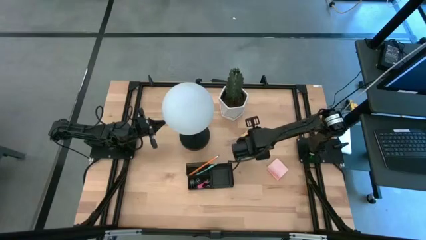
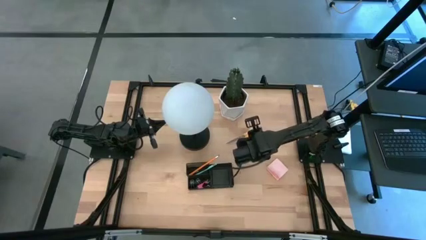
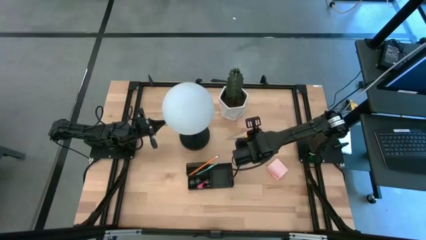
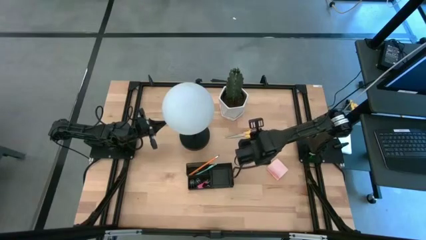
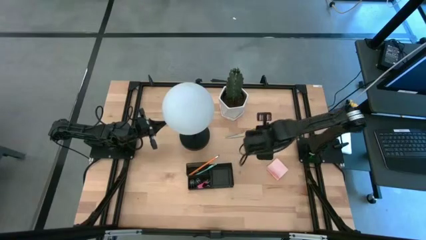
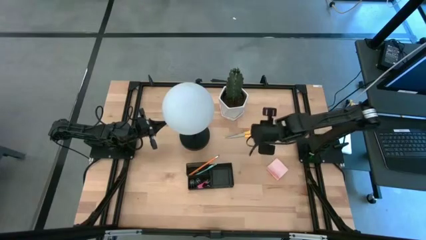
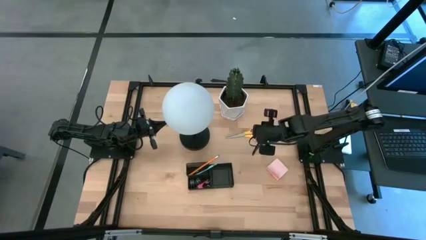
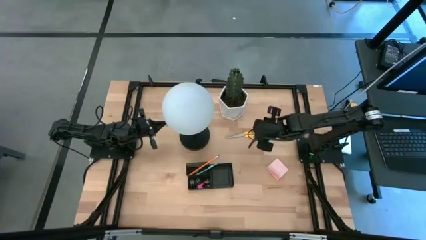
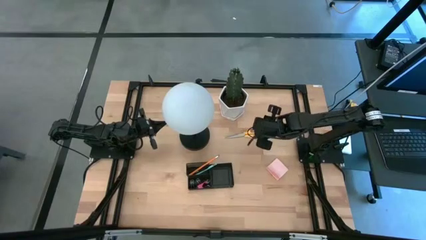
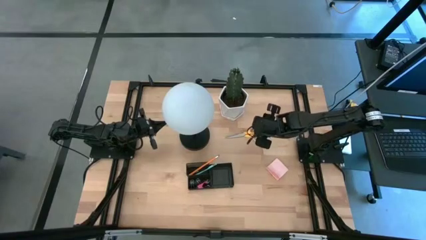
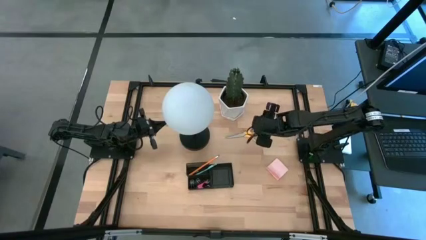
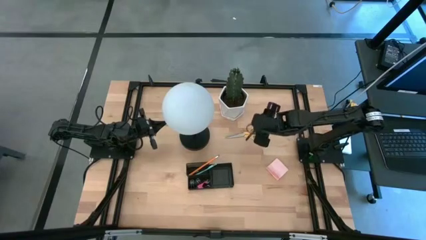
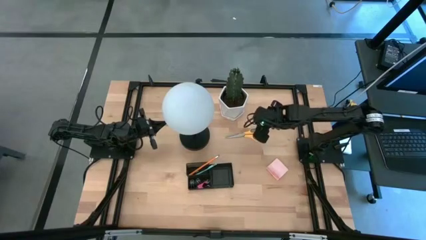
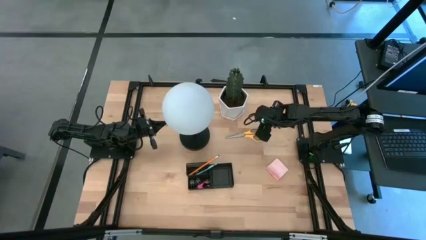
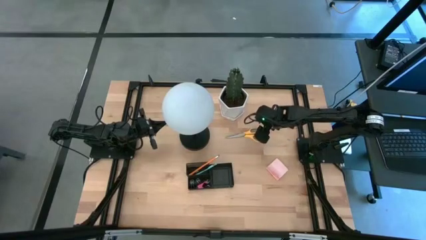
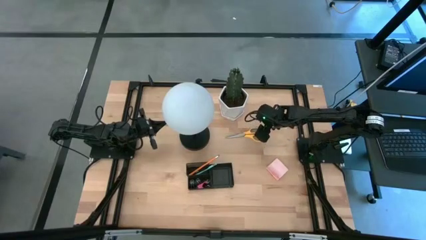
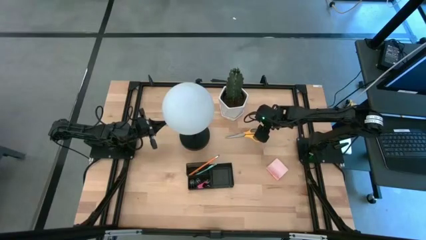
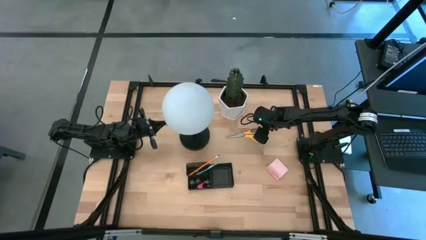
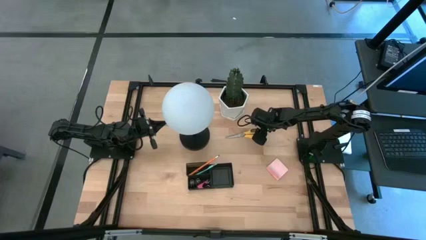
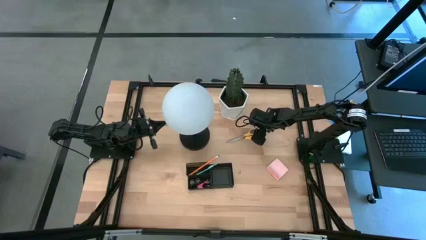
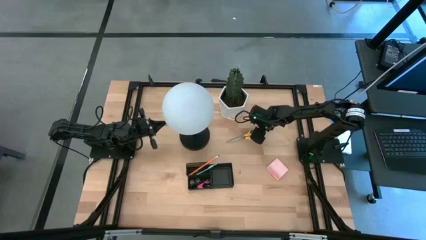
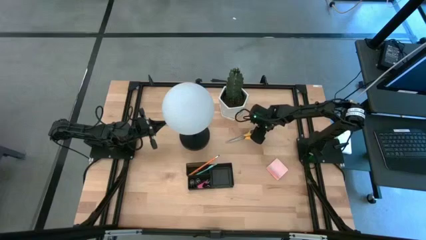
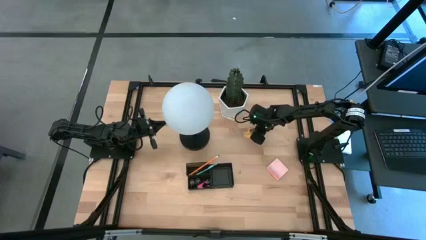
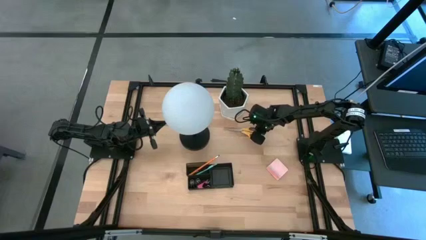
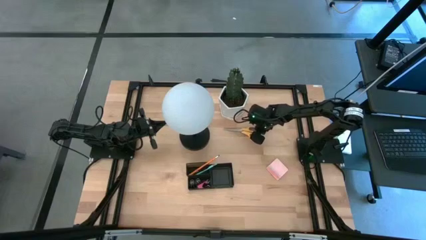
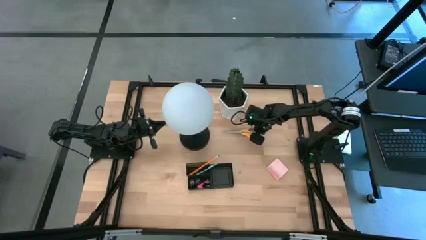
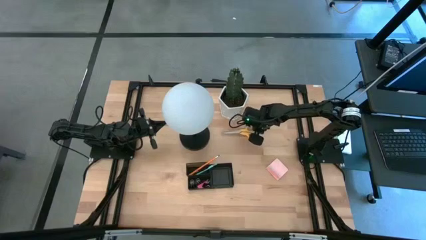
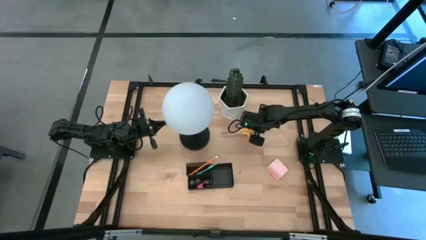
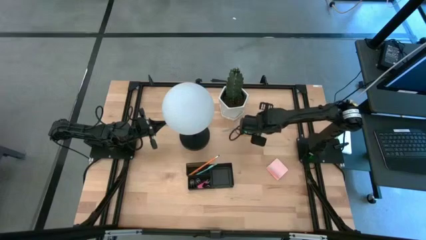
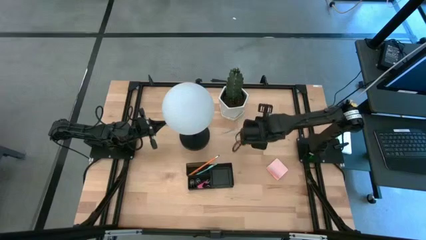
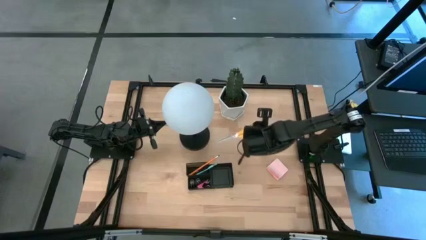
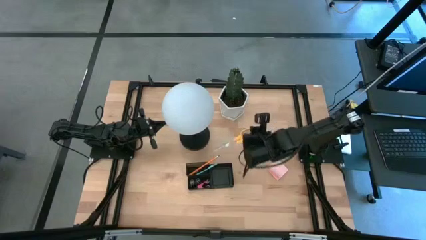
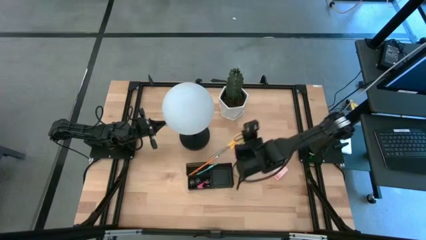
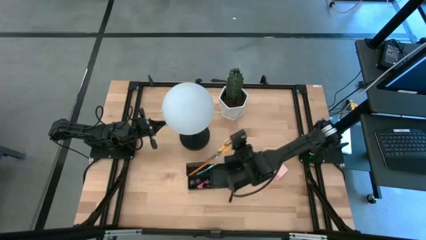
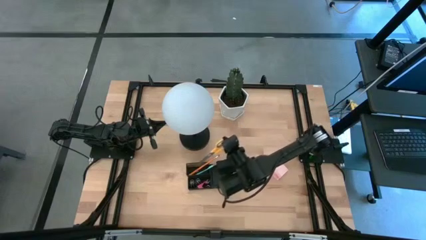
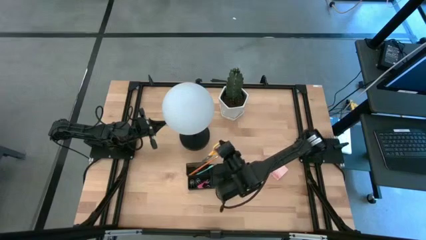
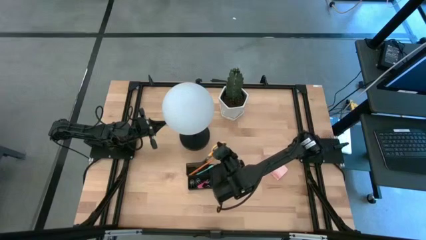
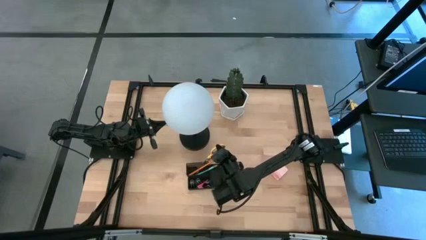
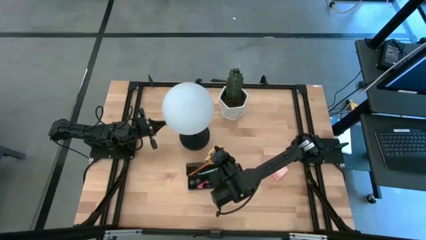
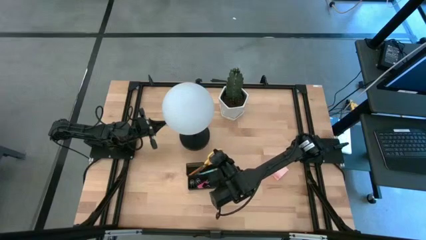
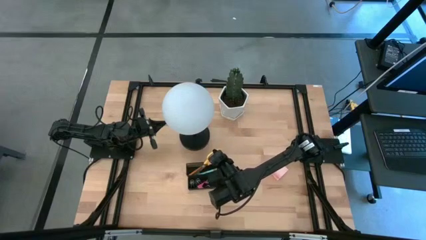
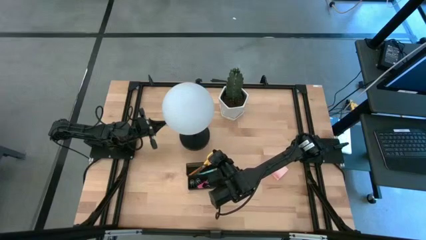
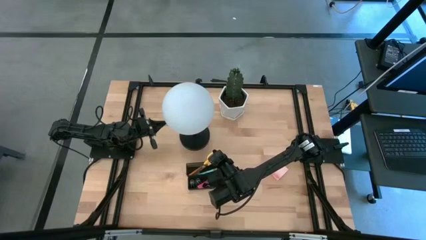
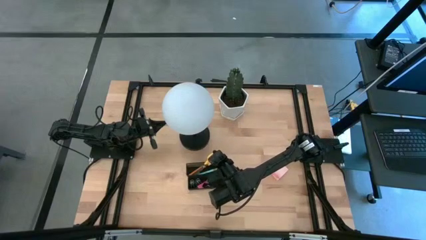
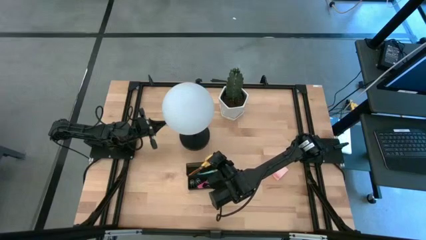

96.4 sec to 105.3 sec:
Task: Pick and place office supplies into organizer
Put the yellow scissors into the desk organizer
